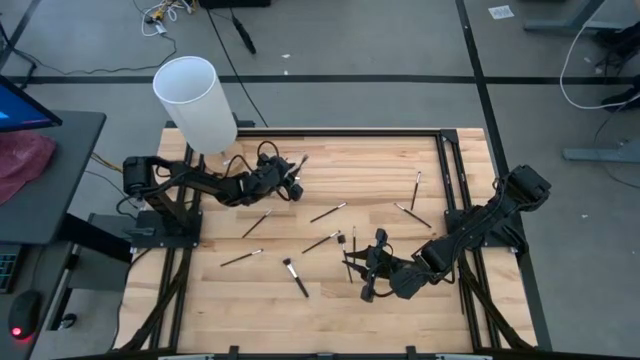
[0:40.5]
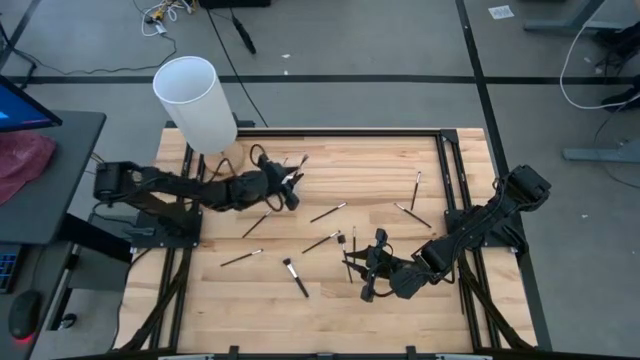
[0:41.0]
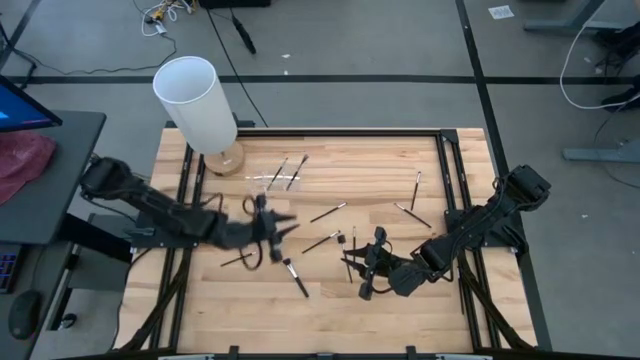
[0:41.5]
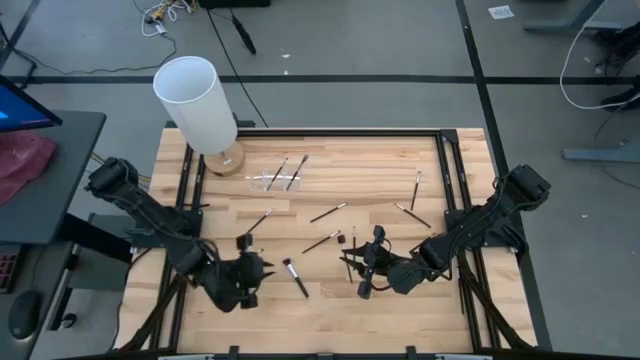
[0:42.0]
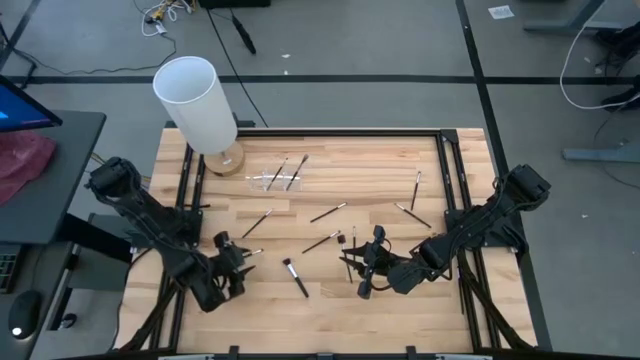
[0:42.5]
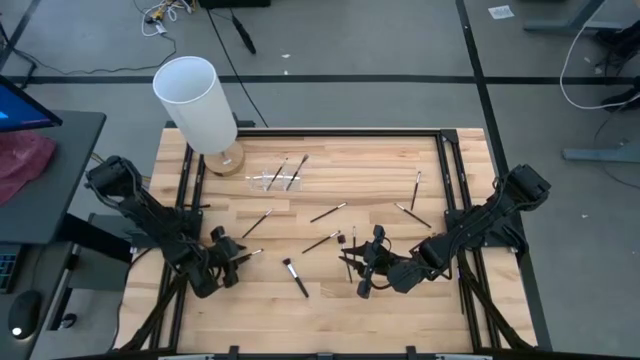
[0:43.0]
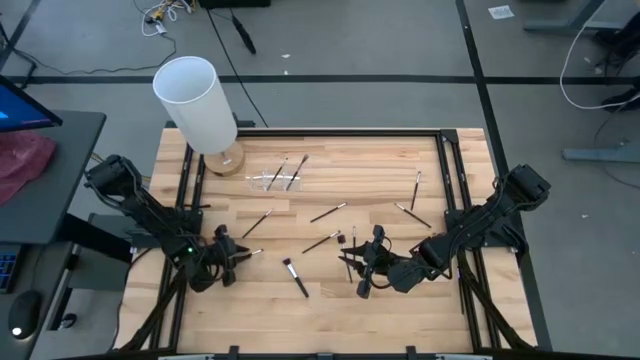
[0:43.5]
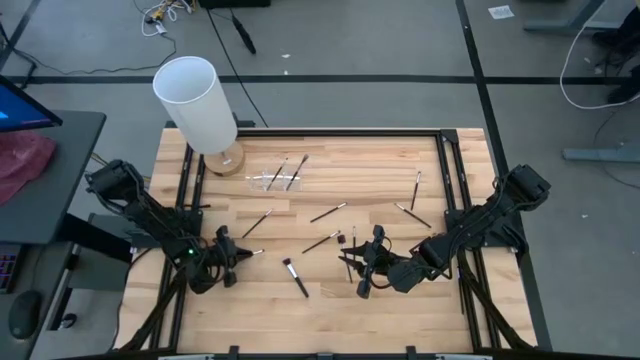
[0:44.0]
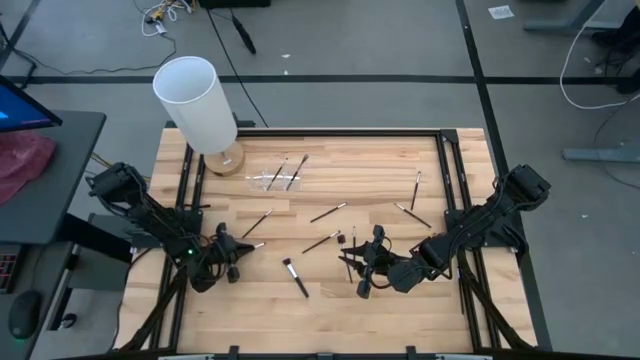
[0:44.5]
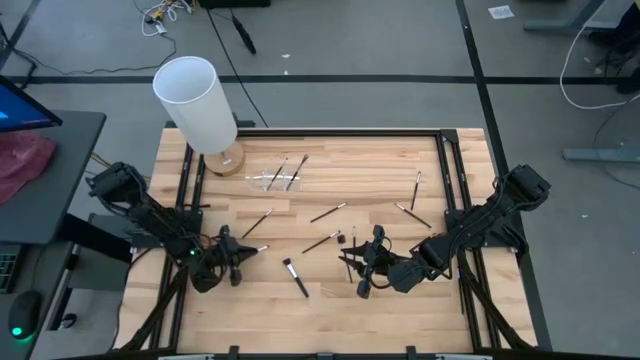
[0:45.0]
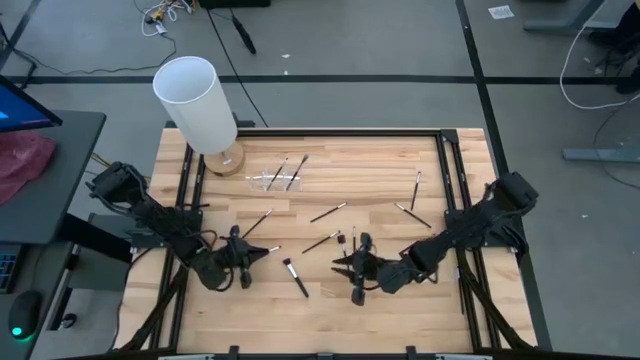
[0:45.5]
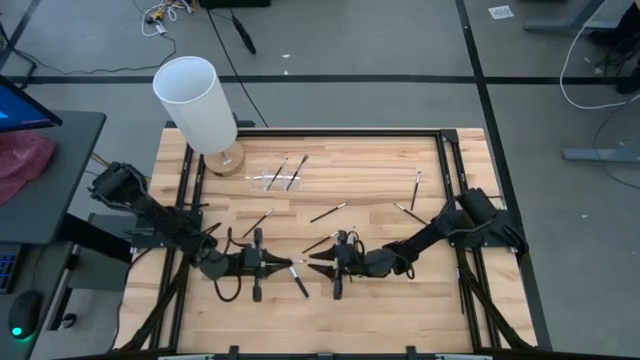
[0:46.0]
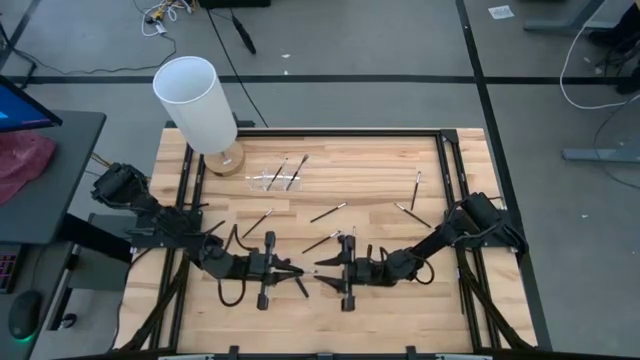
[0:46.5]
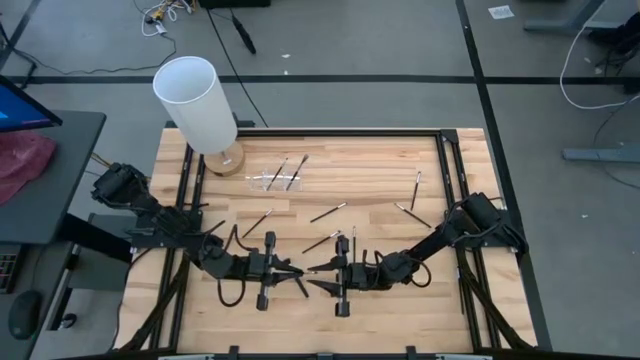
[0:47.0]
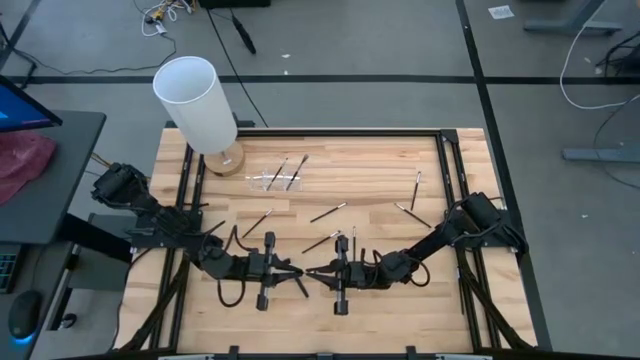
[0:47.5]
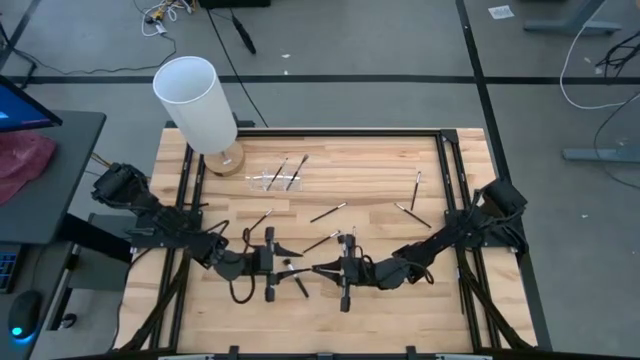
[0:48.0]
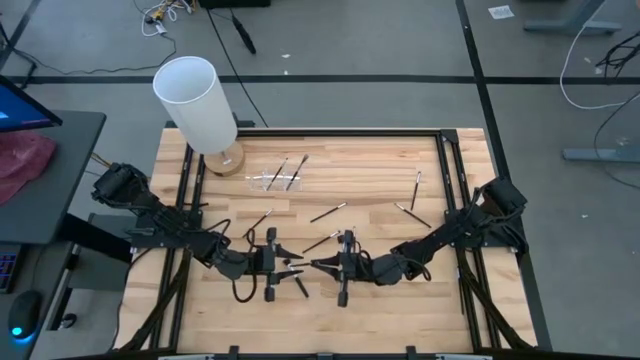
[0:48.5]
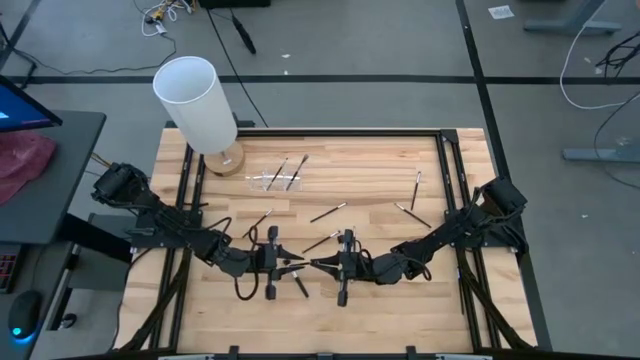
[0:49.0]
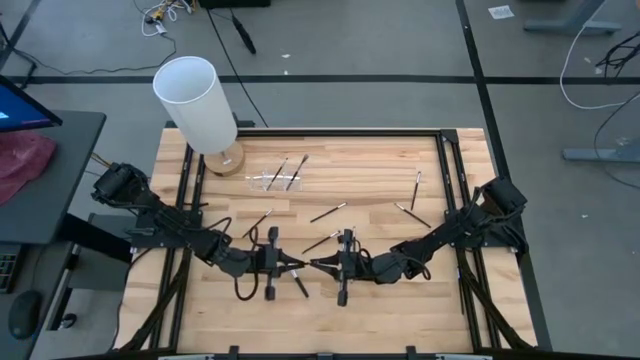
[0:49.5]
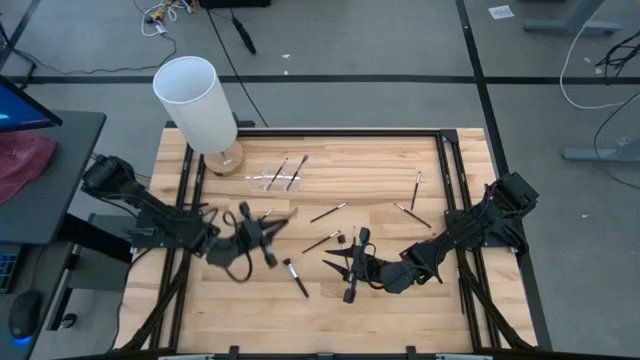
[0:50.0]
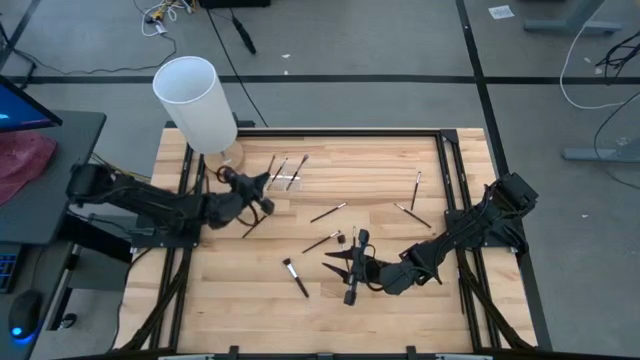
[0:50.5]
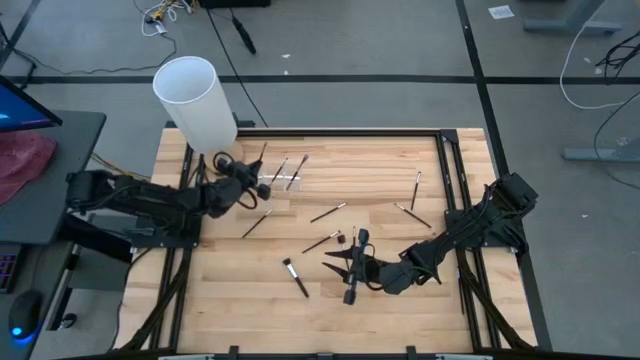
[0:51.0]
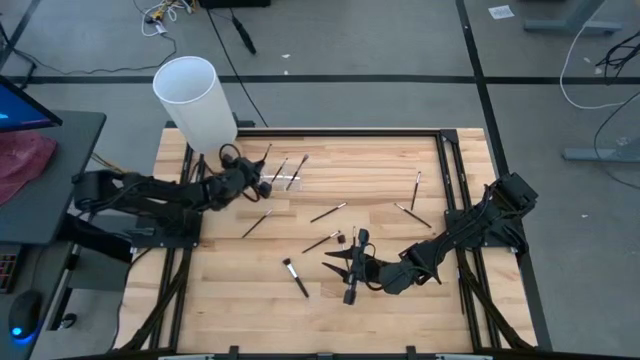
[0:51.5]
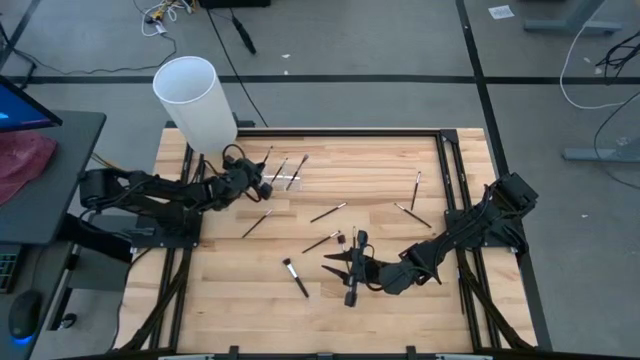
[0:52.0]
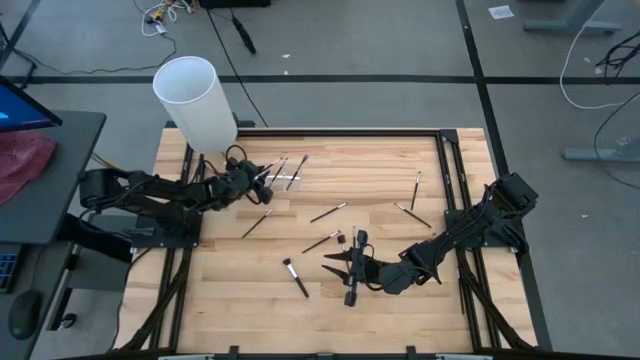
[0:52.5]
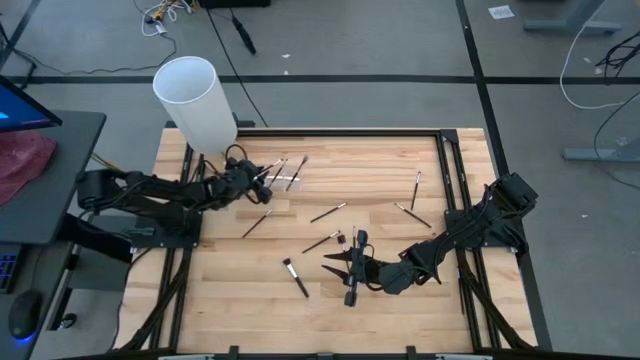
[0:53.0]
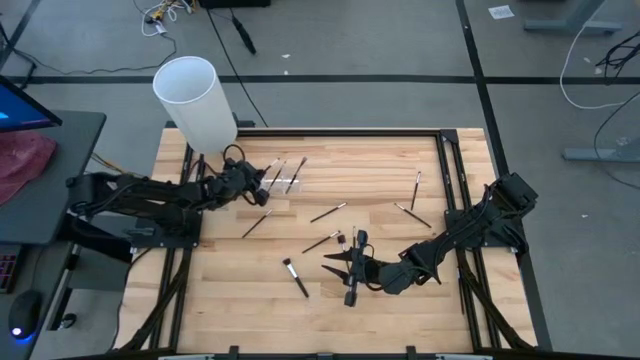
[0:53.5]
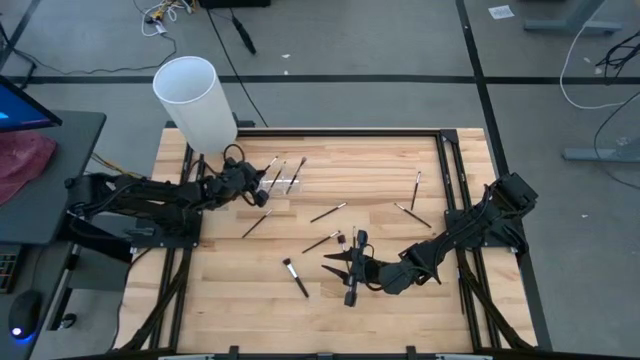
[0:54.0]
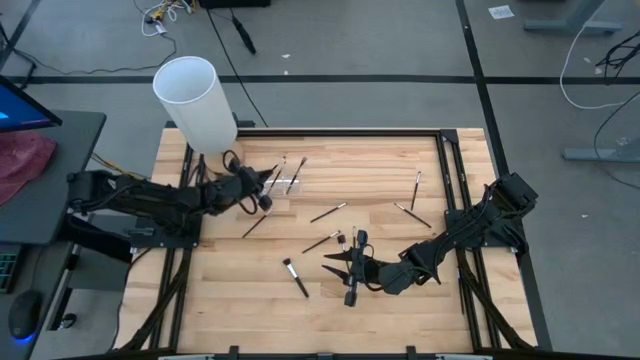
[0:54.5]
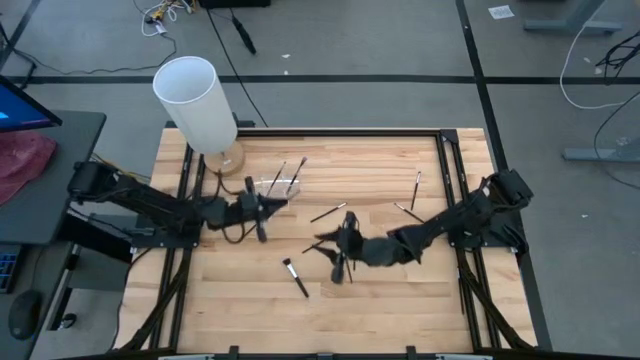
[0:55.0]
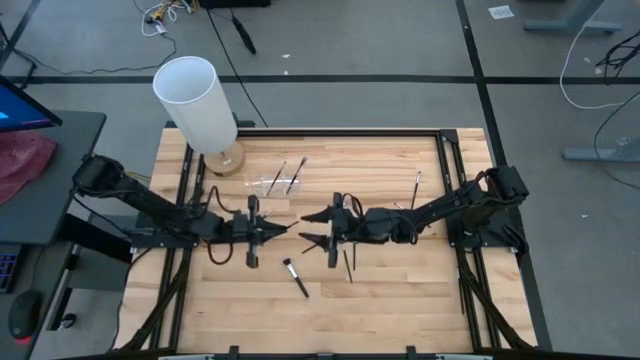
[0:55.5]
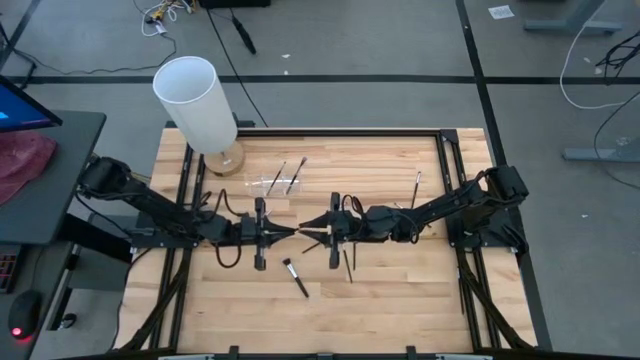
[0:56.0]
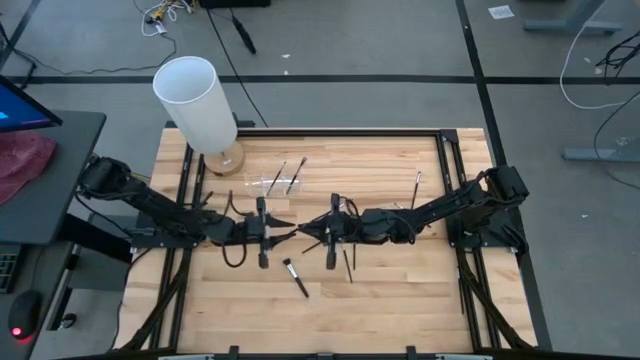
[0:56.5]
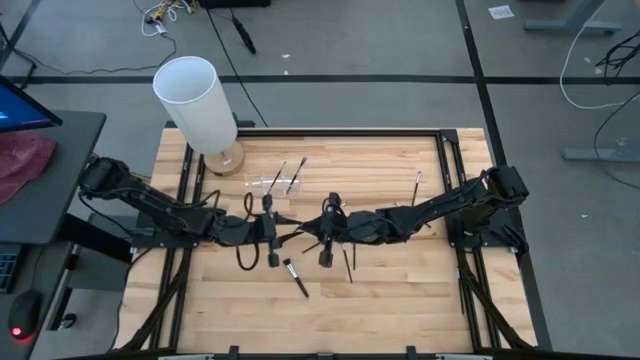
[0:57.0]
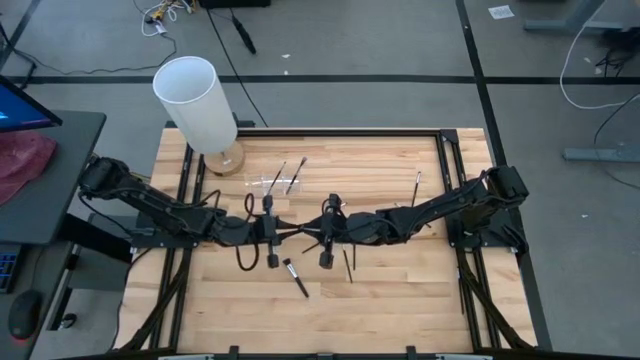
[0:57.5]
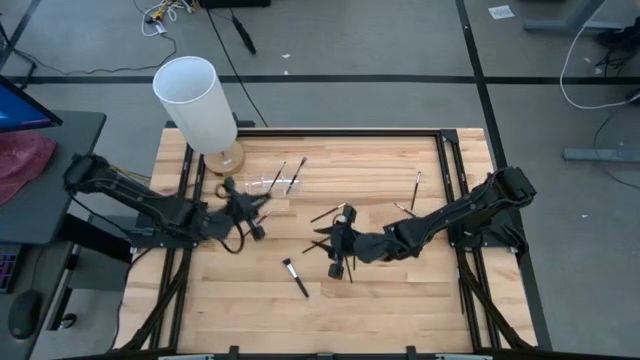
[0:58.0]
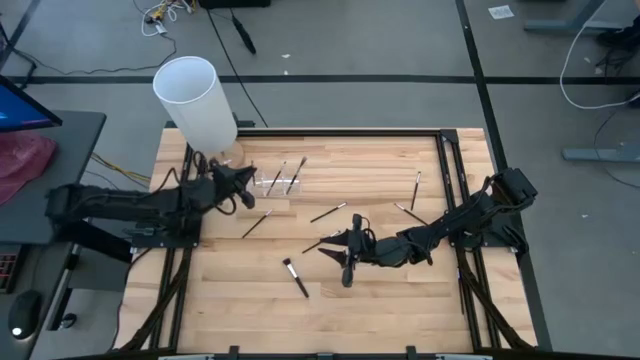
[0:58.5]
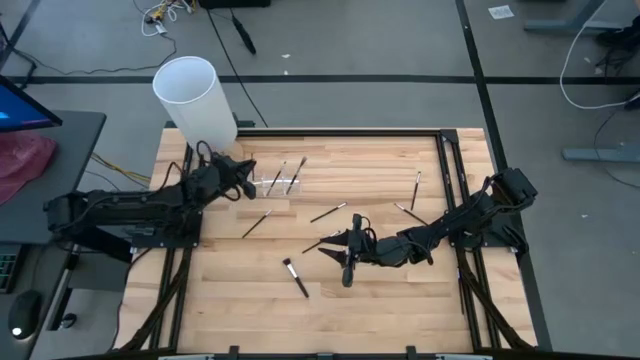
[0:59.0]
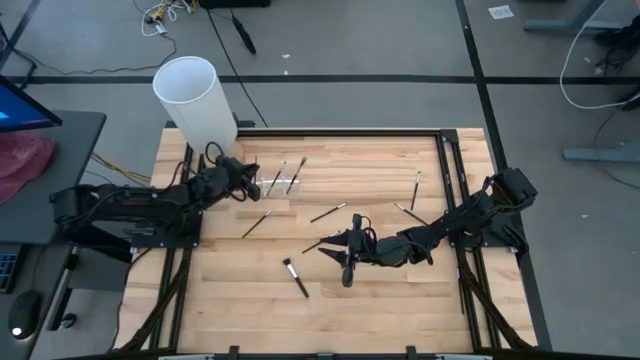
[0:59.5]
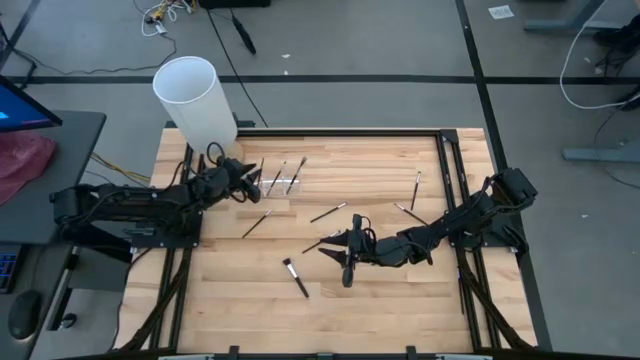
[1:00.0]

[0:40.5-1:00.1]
Task: Put items in baskets/containers
Put the eyeshadow brush into the transparent organizer
